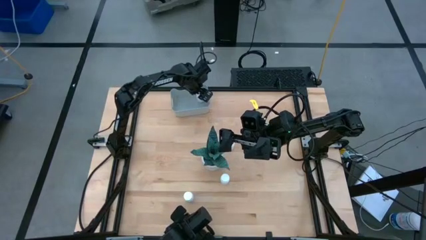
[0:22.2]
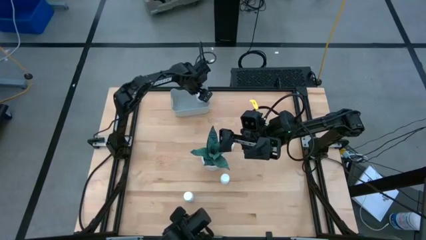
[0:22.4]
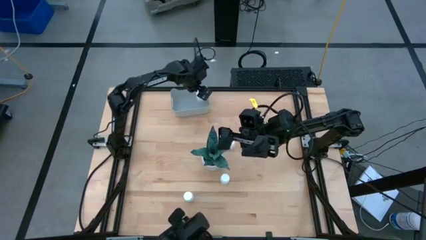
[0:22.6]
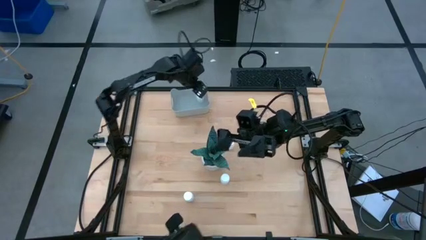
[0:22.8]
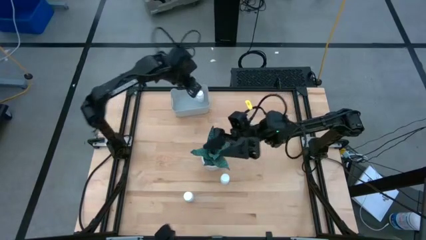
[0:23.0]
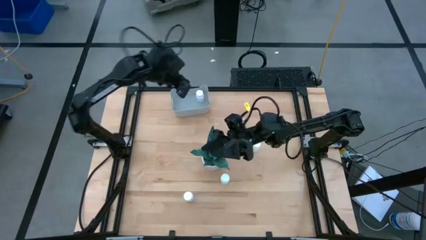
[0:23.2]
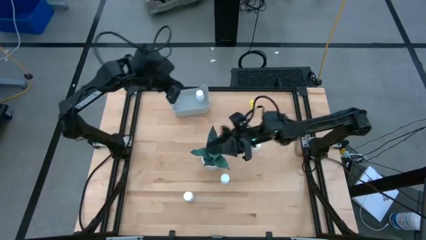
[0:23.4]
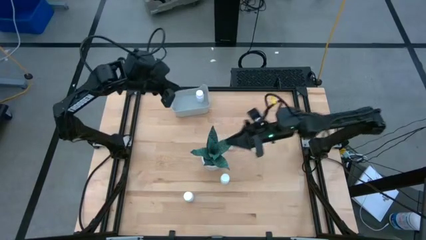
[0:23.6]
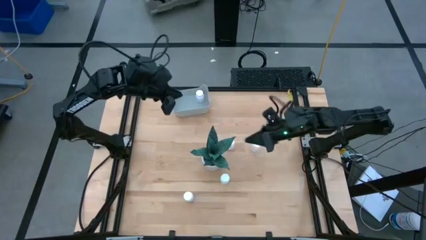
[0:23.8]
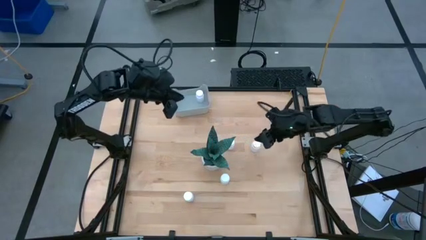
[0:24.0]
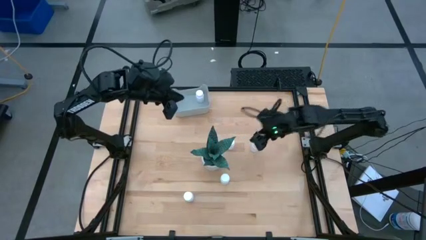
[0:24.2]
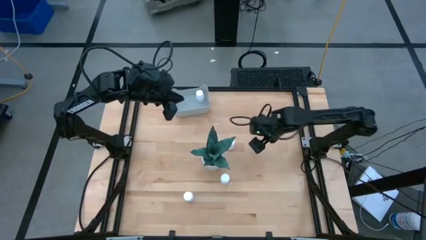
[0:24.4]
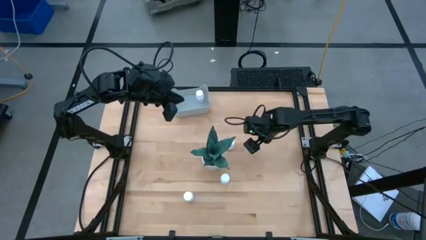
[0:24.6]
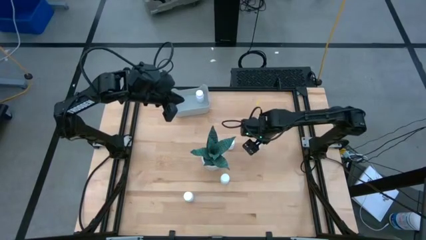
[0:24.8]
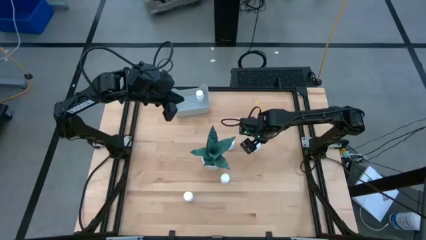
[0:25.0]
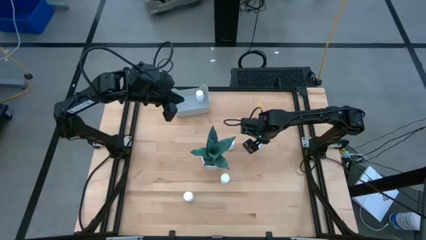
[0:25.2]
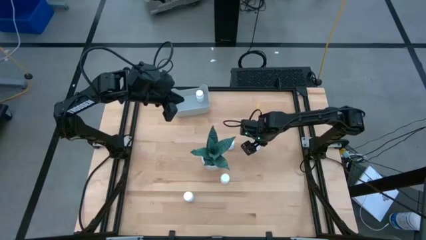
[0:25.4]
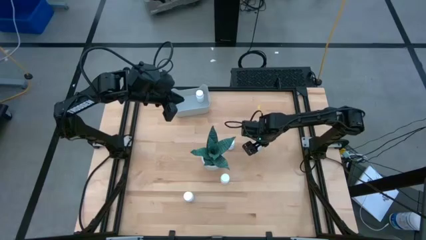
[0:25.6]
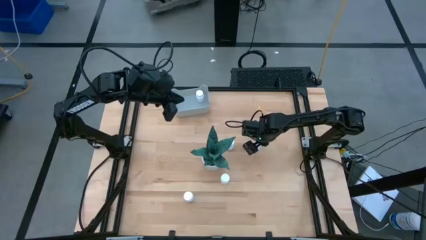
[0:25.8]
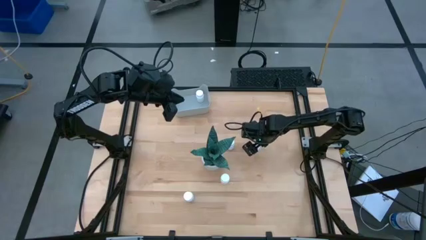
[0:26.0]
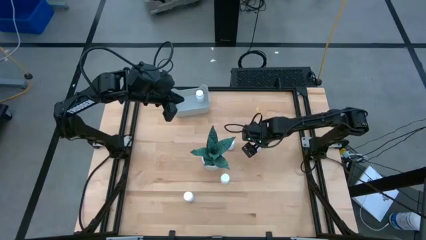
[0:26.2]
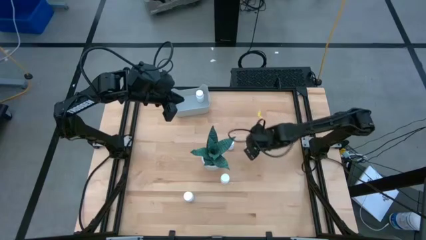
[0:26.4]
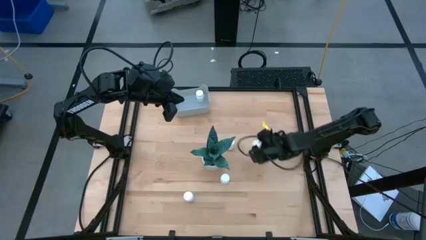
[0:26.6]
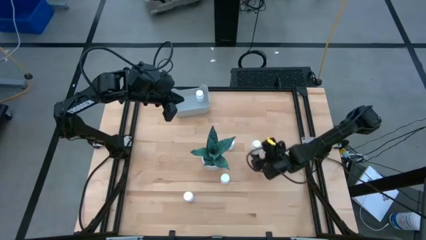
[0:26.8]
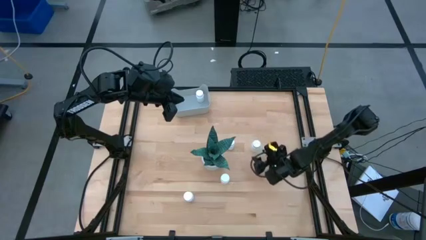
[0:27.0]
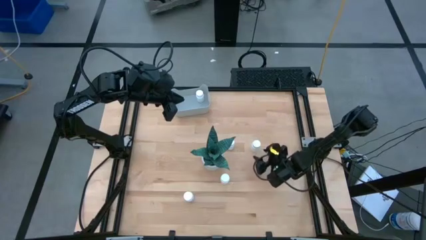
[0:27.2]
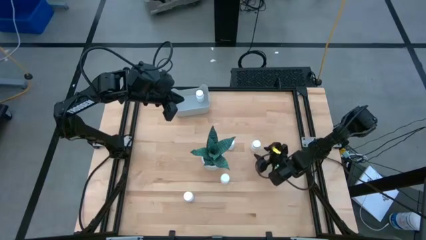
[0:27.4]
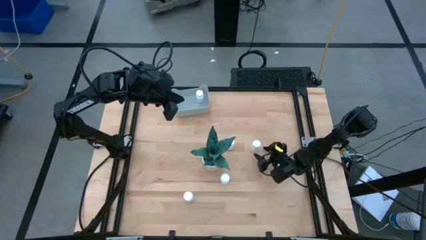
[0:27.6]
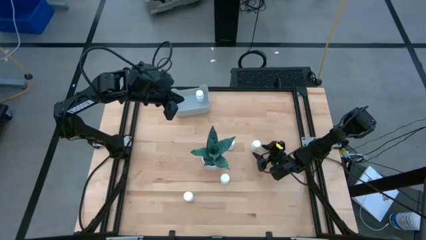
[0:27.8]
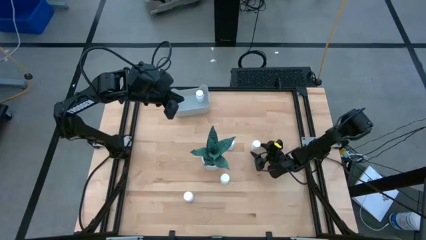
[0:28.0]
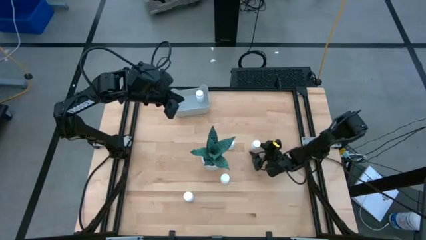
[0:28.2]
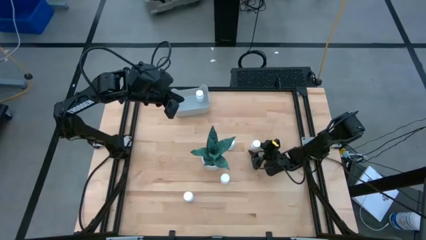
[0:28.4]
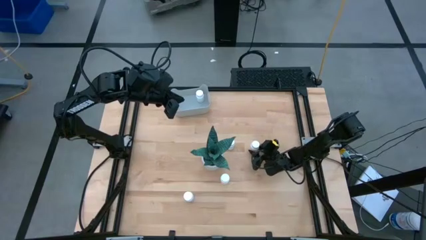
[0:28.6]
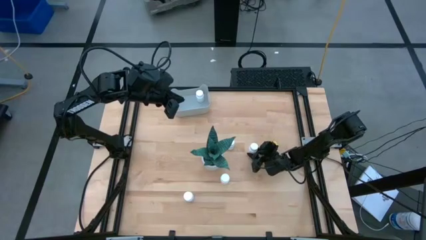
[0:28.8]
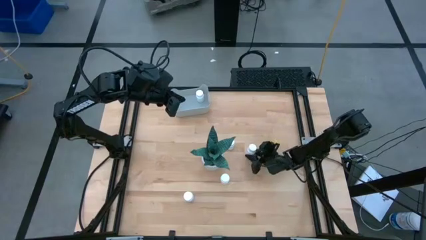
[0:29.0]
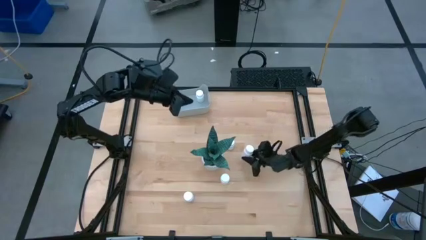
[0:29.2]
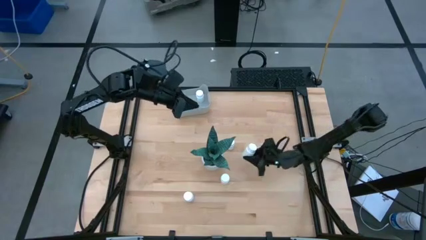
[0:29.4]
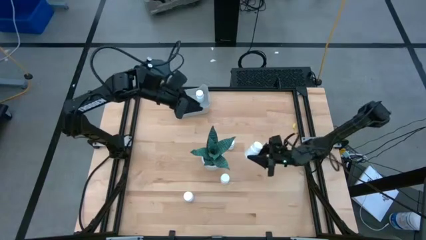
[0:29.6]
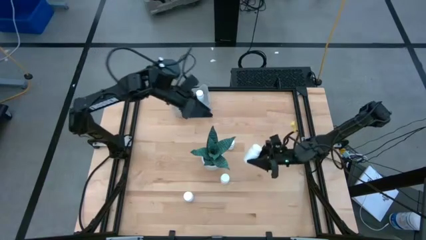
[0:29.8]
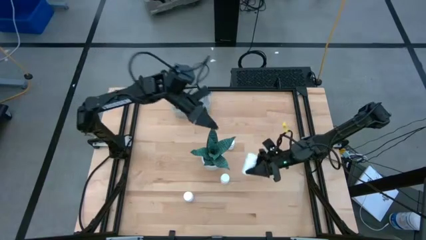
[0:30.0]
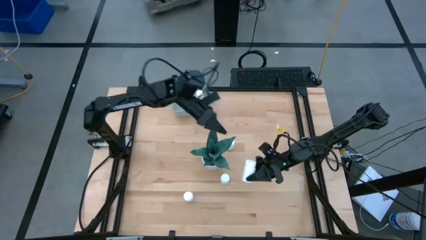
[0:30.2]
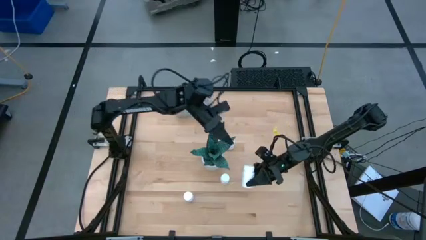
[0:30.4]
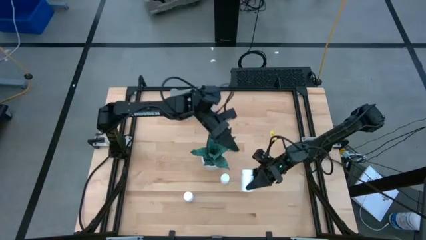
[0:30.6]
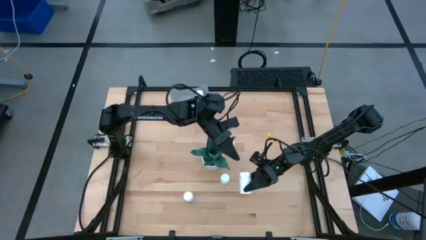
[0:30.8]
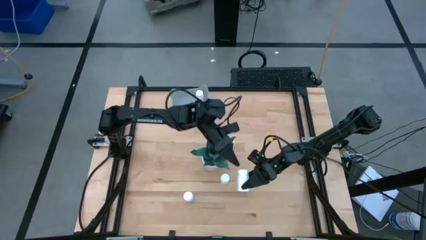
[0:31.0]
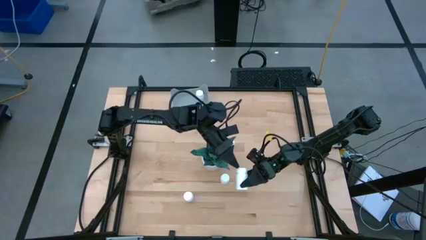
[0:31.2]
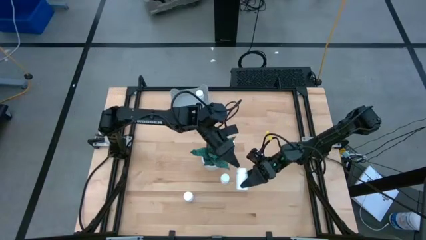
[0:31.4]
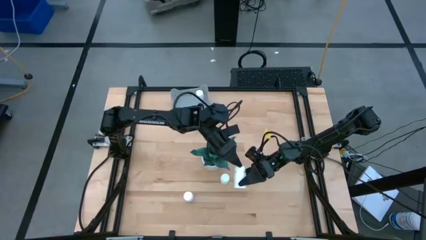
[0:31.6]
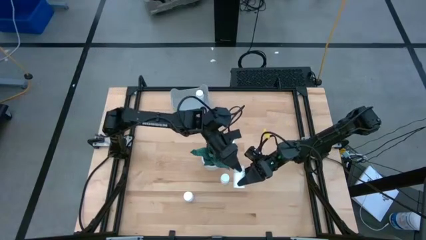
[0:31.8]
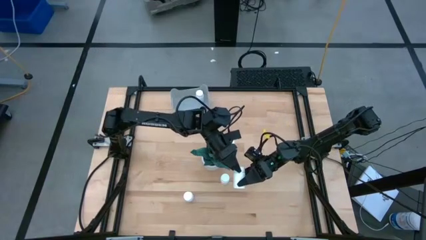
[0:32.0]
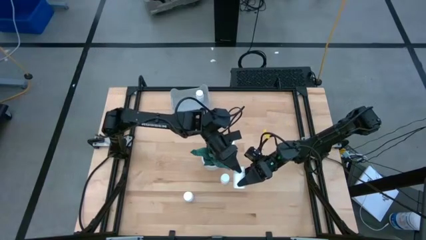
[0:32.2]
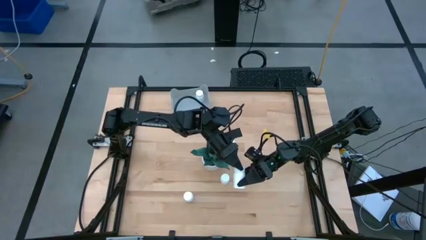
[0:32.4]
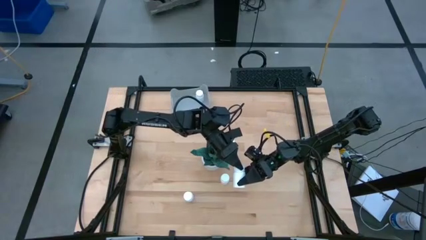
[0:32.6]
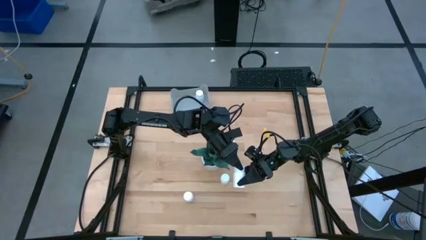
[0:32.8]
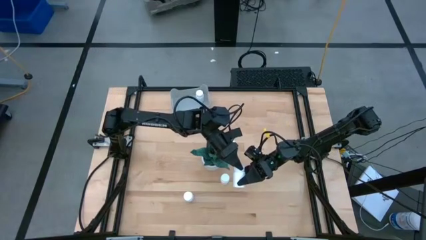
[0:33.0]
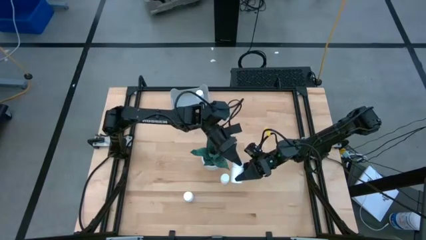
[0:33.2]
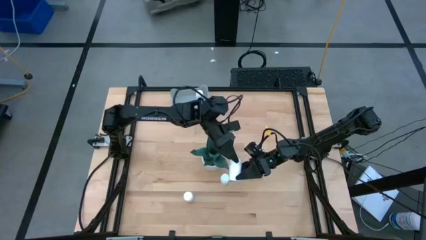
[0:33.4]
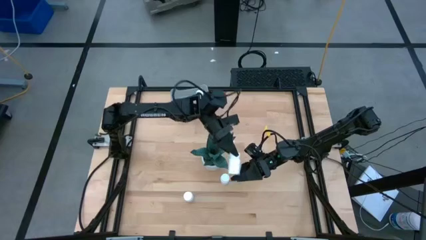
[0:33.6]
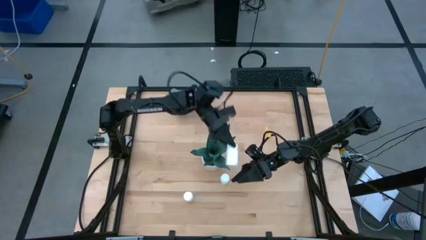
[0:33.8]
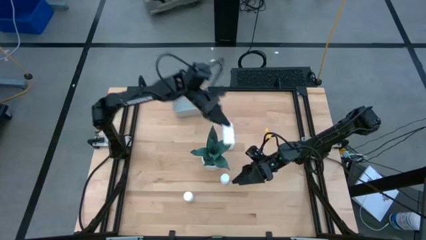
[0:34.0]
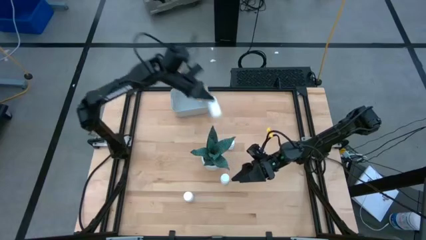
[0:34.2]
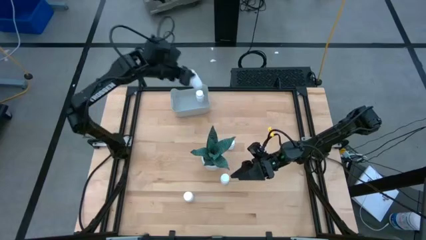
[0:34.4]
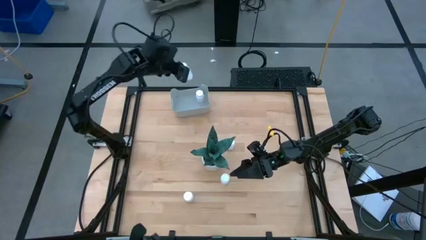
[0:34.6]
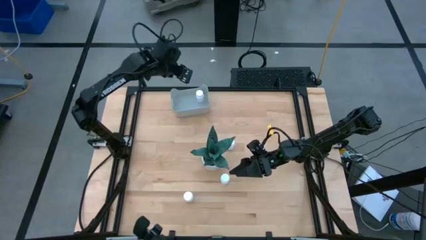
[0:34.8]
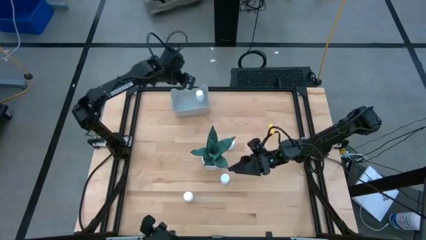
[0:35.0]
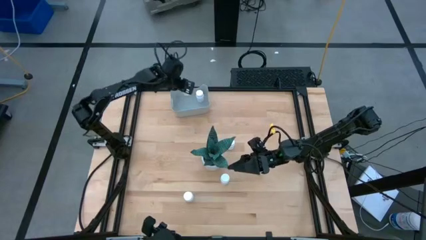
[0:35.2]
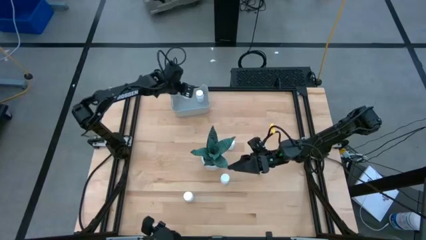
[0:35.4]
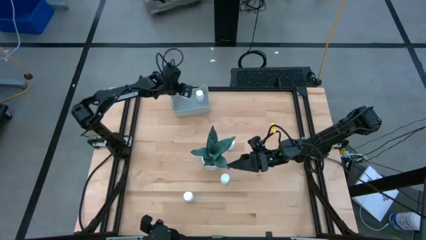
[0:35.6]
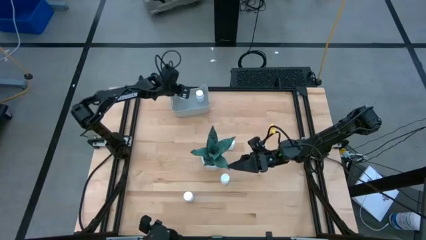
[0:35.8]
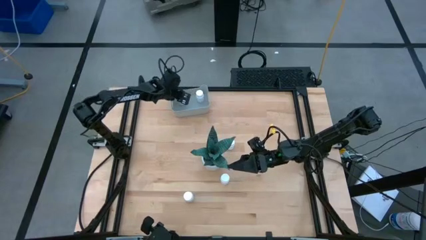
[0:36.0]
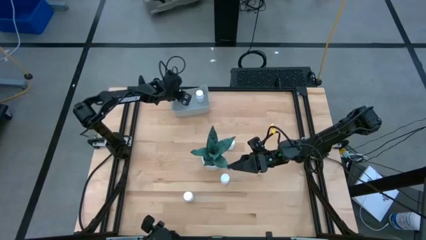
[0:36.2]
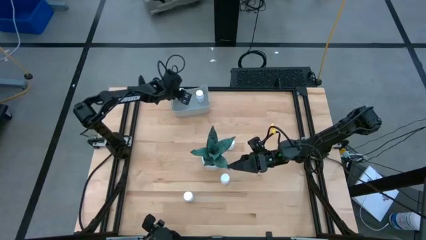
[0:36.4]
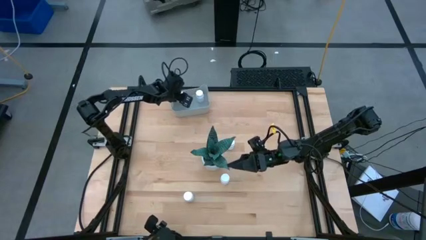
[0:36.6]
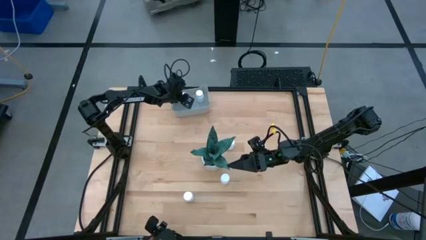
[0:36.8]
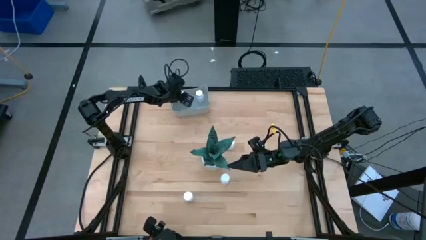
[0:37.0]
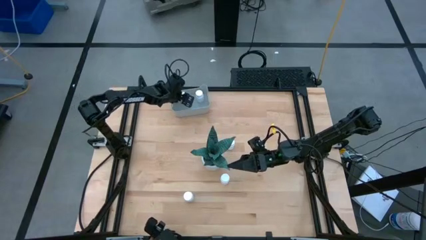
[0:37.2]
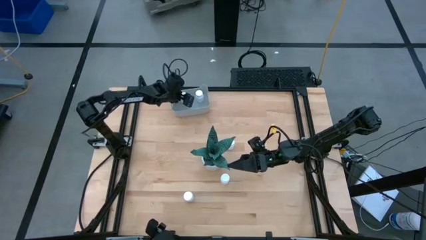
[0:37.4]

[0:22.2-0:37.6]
Task: Pick and place pill bottles into a basket
Put the white medicine bottle into the gray bin

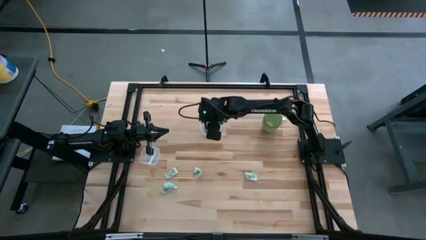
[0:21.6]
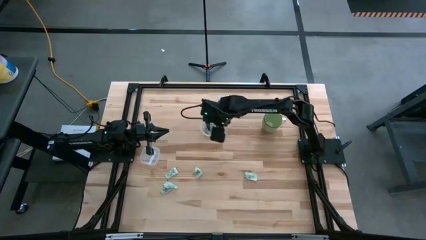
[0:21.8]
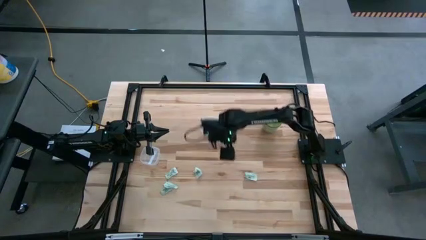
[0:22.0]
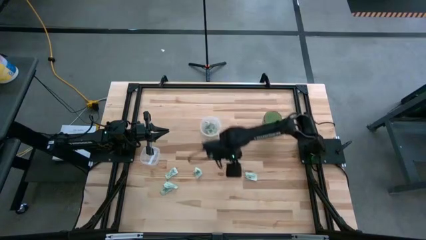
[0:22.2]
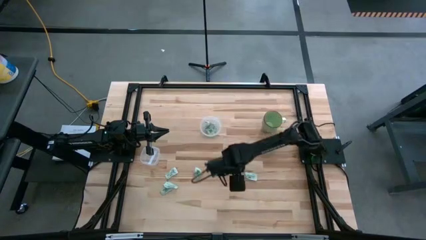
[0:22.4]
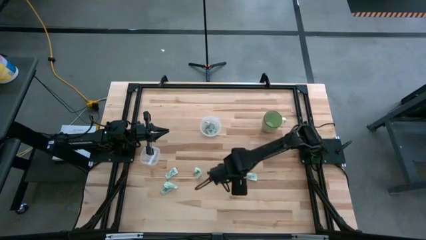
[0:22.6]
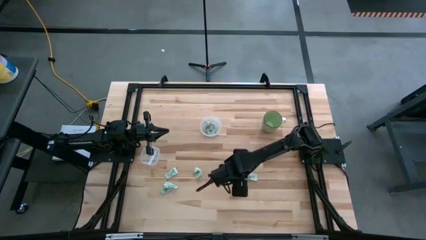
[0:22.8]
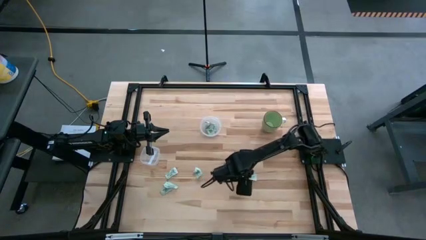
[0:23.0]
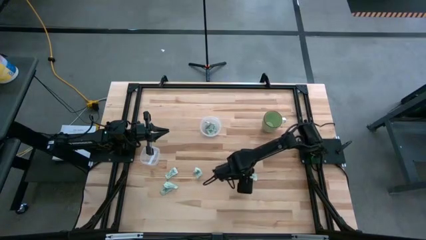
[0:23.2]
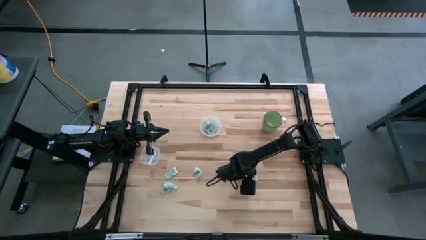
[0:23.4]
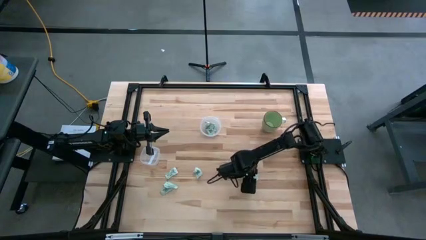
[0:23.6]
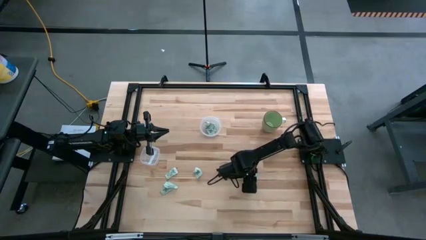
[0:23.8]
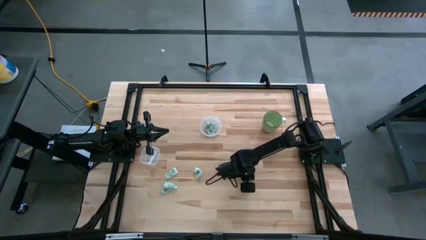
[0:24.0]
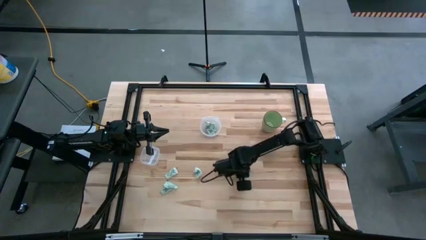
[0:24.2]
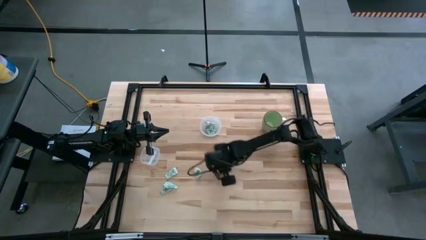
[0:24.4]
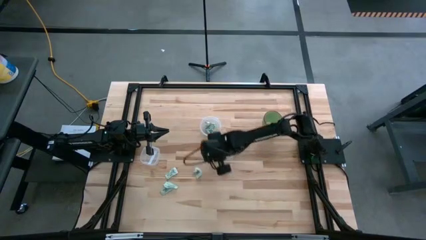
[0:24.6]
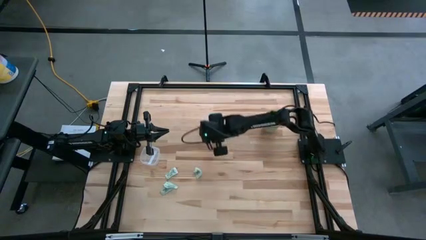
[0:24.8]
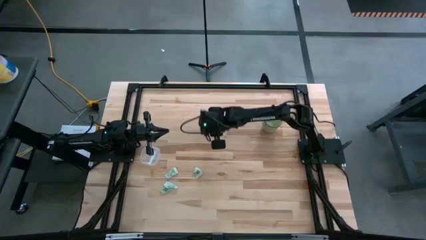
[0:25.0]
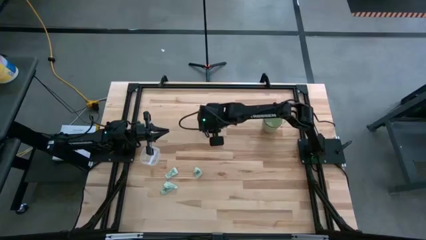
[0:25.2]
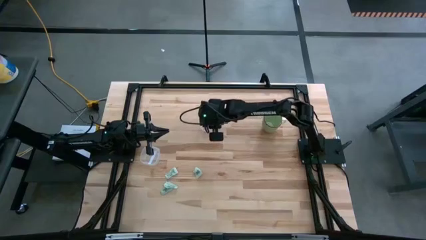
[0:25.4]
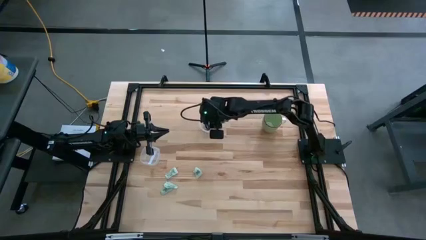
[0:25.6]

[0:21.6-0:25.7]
Task: Pick and place Stevia / Truvia into bins
Put the stevia packet into the right transparent container
